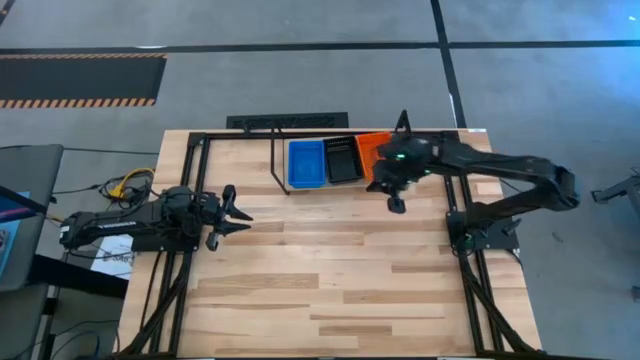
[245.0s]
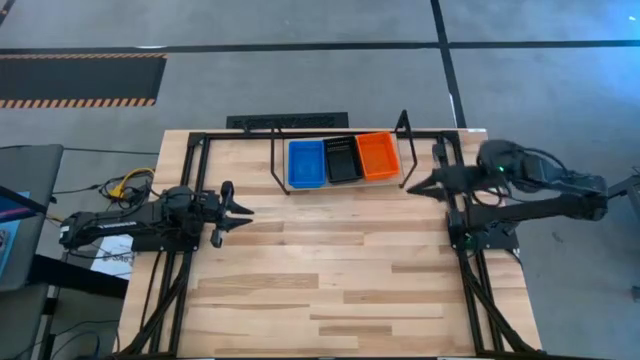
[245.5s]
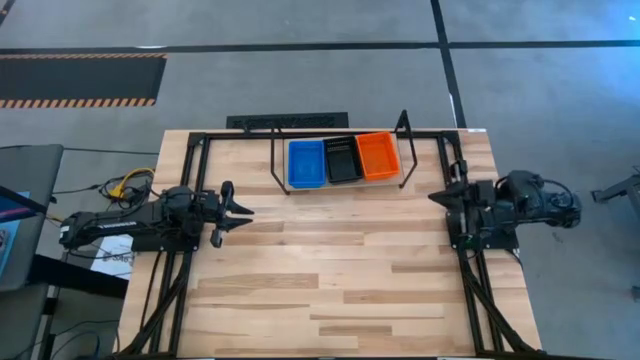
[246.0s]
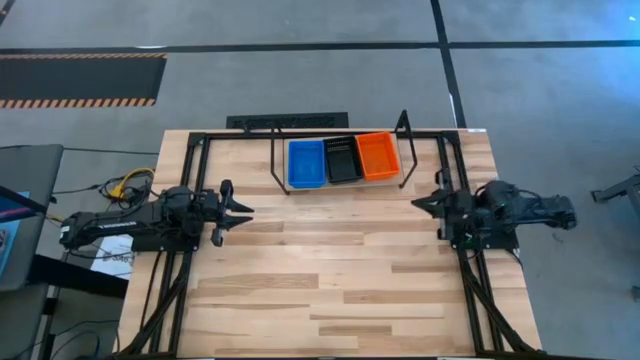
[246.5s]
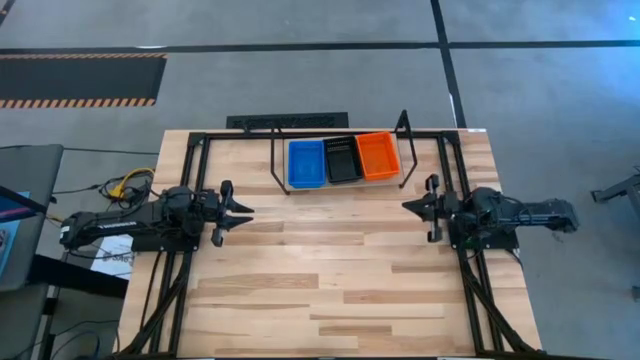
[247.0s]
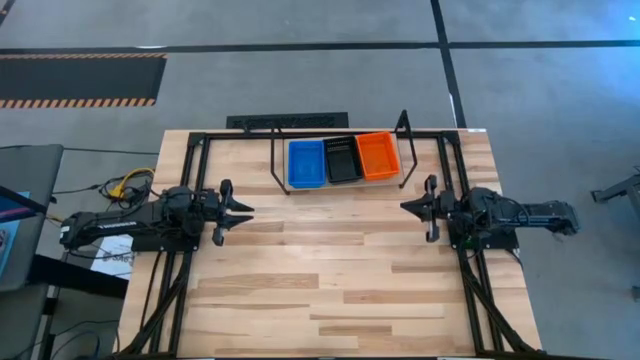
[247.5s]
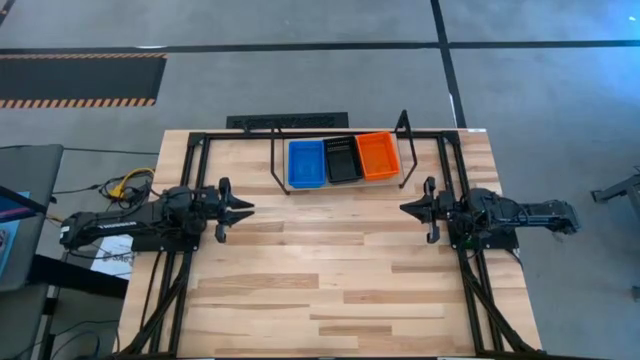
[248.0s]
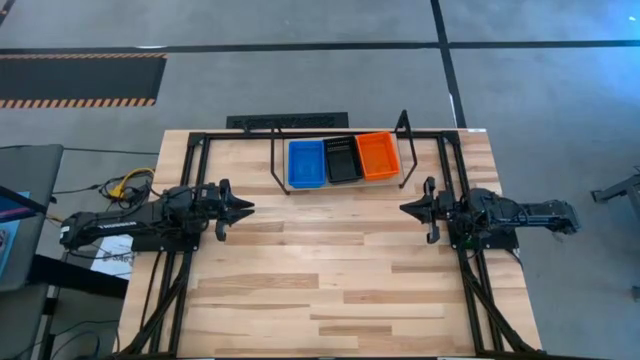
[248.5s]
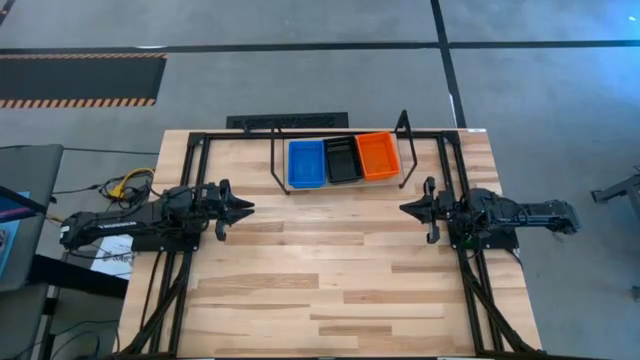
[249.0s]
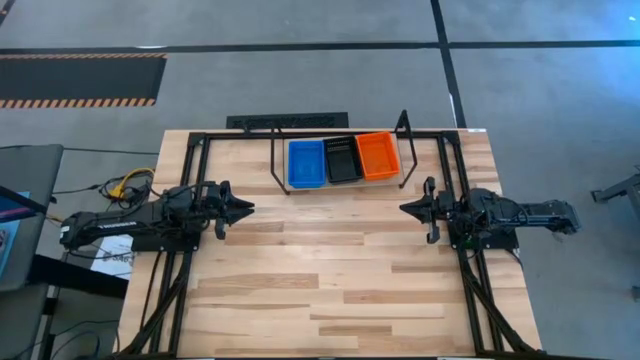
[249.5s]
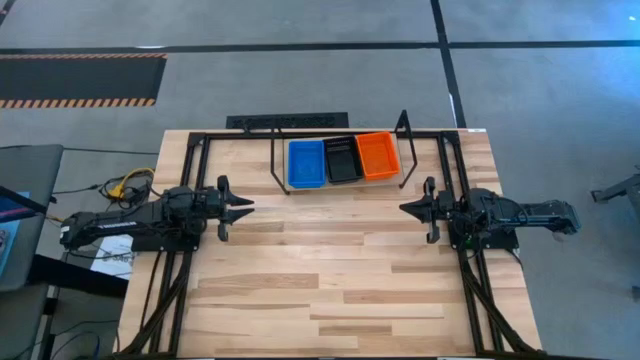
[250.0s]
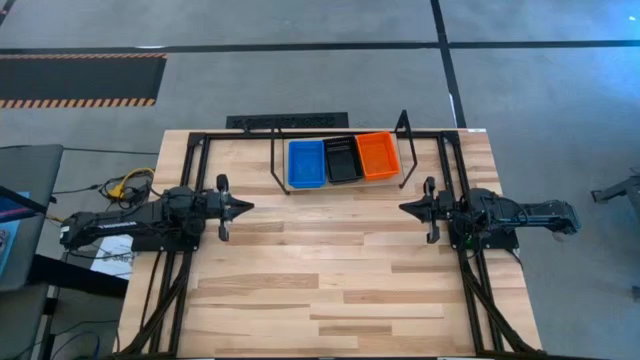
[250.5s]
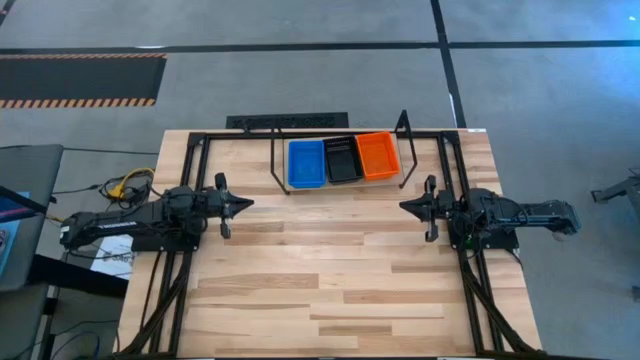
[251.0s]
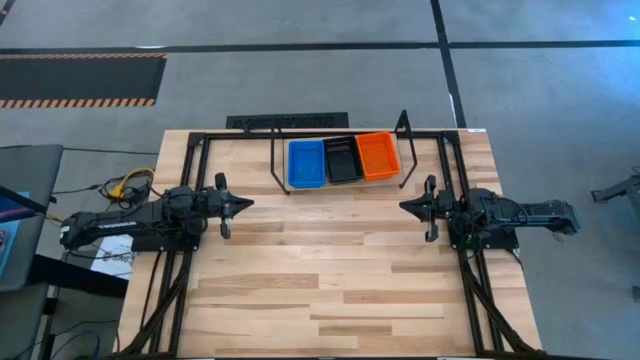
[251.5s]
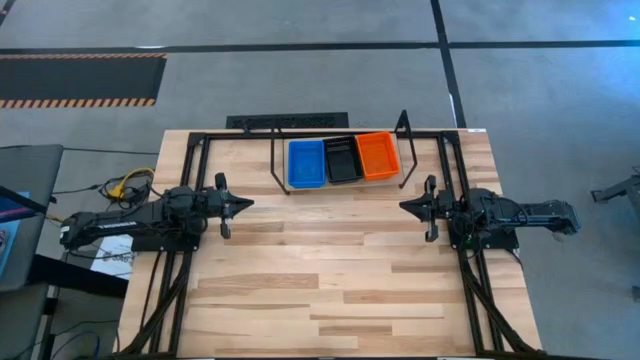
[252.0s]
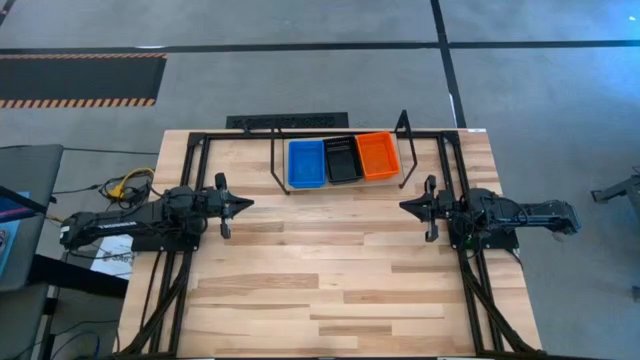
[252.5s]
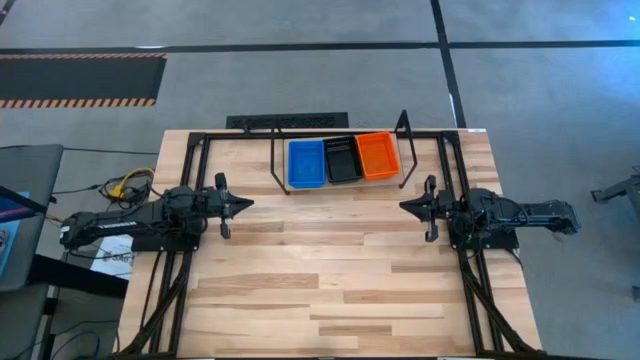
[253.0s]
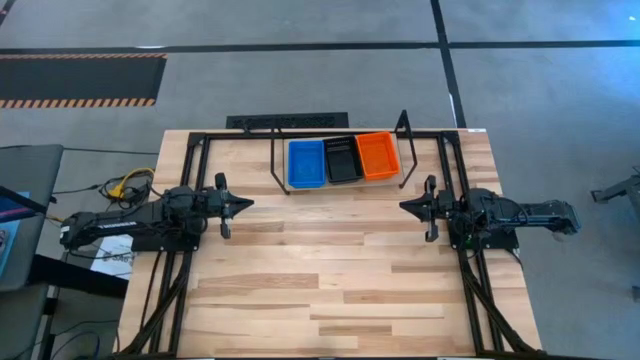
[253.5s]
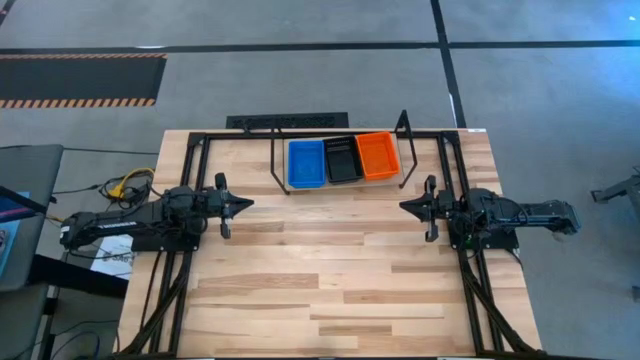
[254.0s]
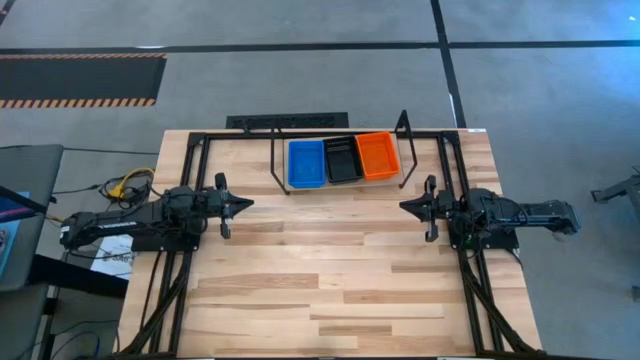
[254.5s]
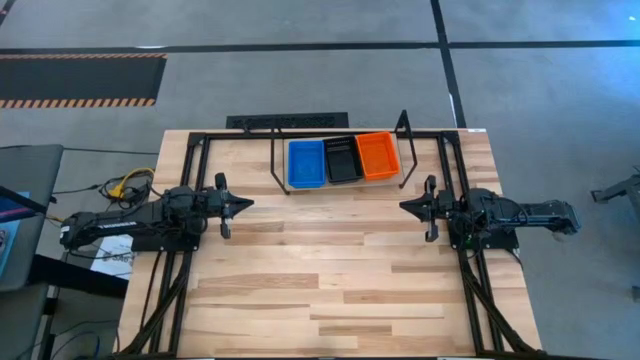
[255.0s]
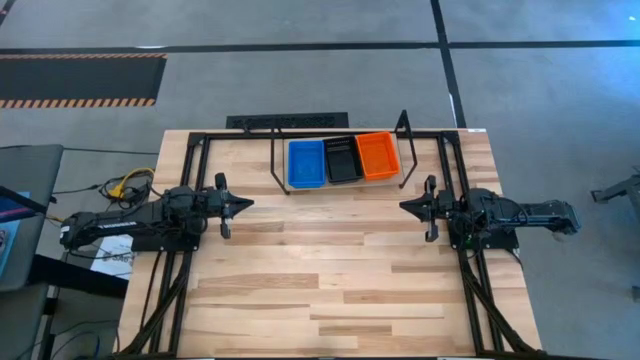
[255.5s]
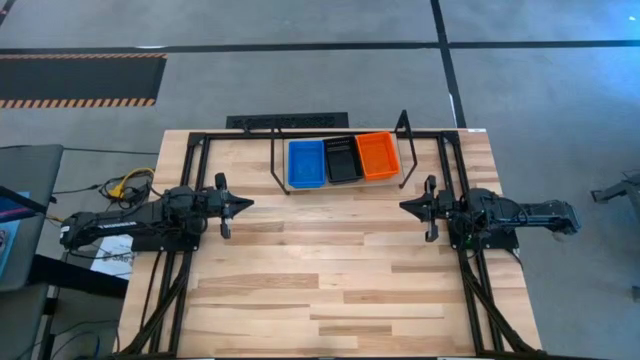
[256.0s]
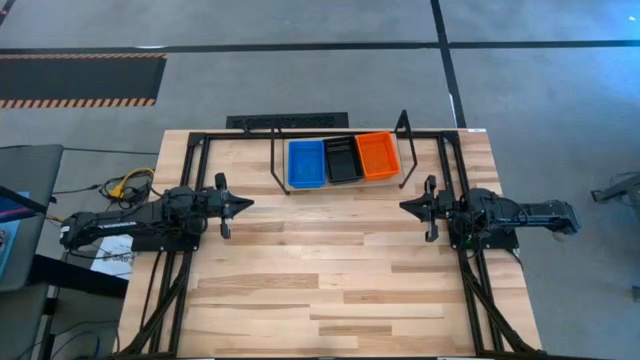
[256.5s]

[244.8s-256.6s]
Task: Stack baskets on shelf by color
Return to Home Position

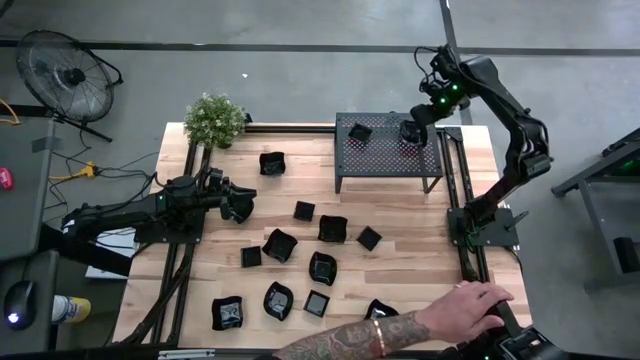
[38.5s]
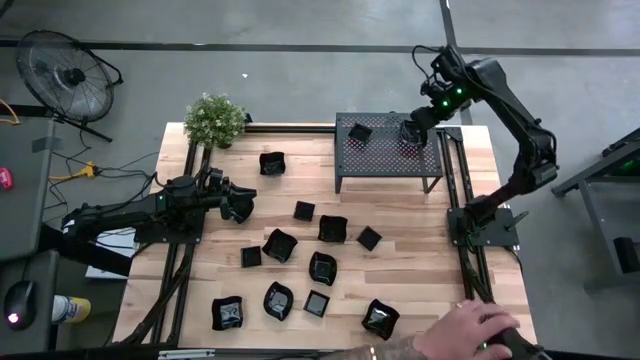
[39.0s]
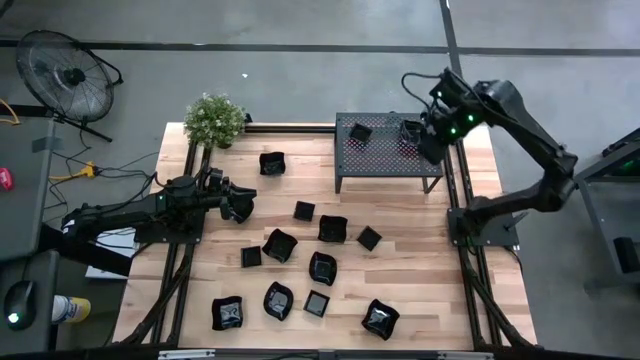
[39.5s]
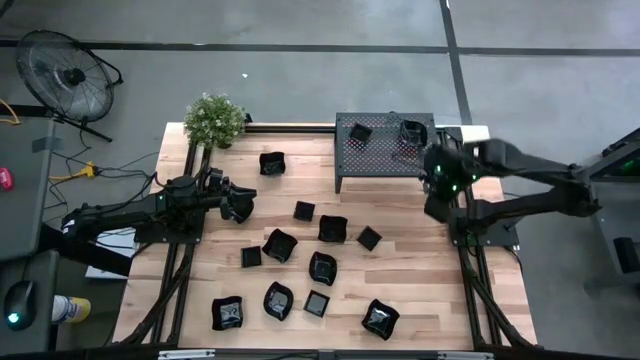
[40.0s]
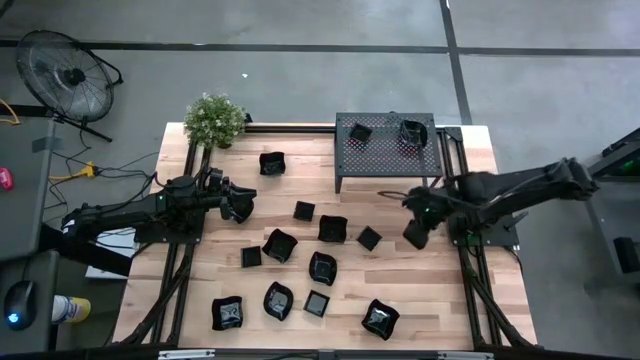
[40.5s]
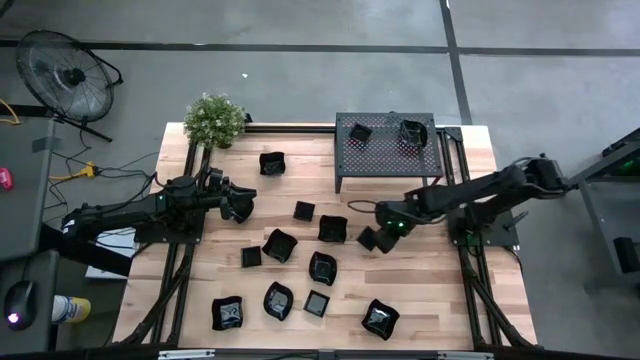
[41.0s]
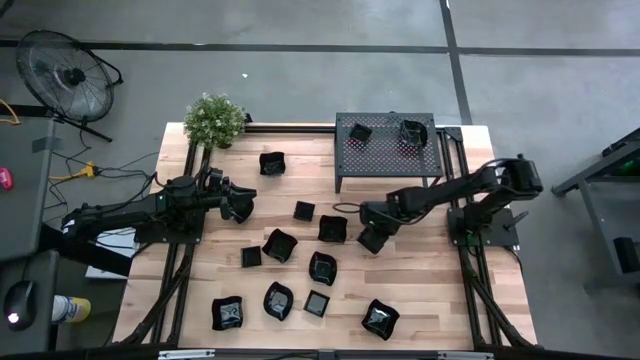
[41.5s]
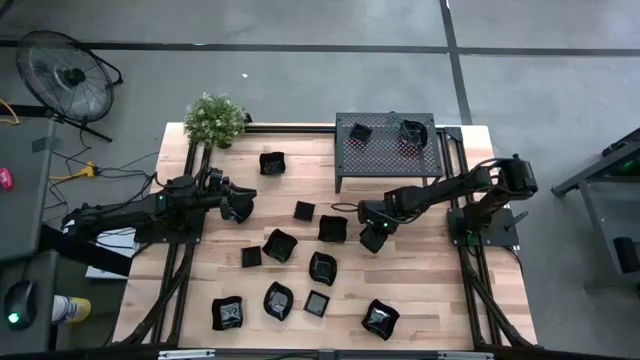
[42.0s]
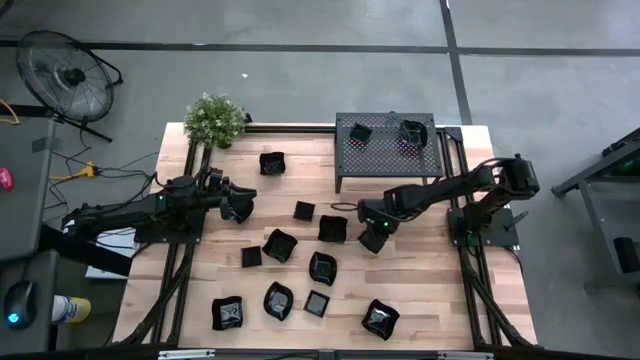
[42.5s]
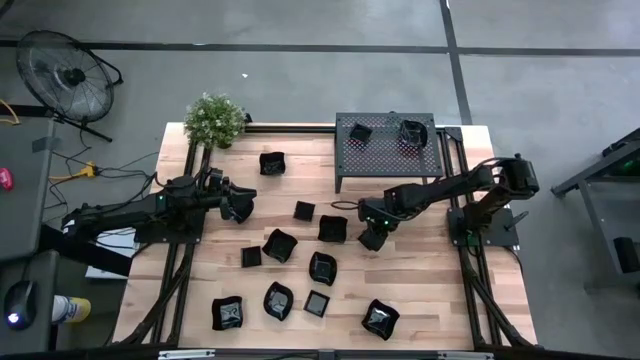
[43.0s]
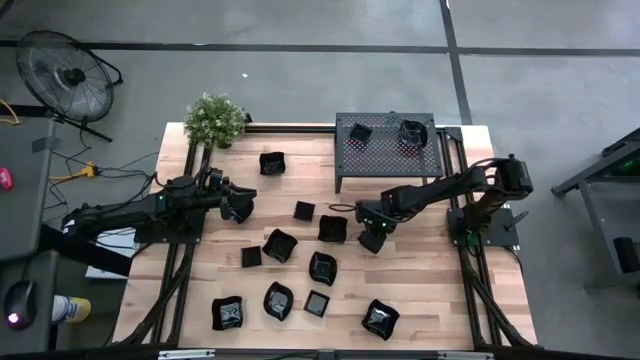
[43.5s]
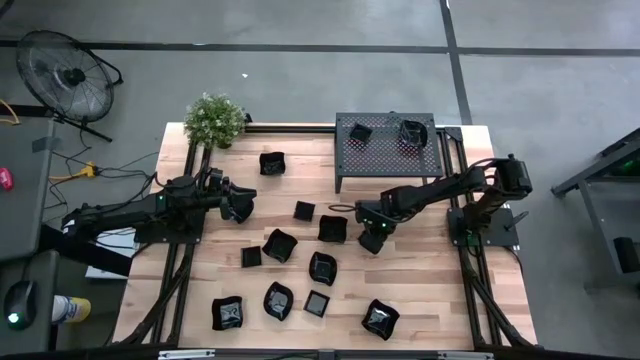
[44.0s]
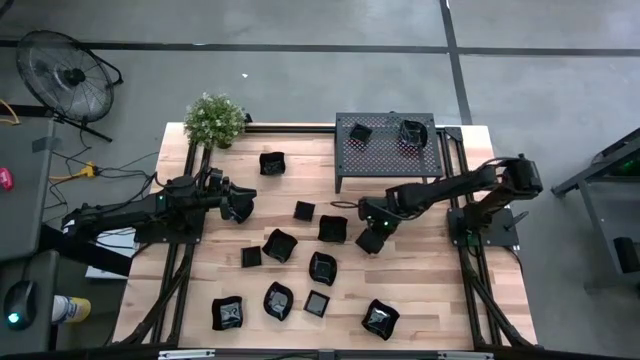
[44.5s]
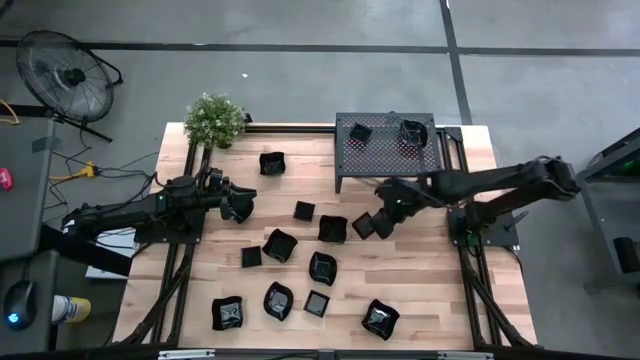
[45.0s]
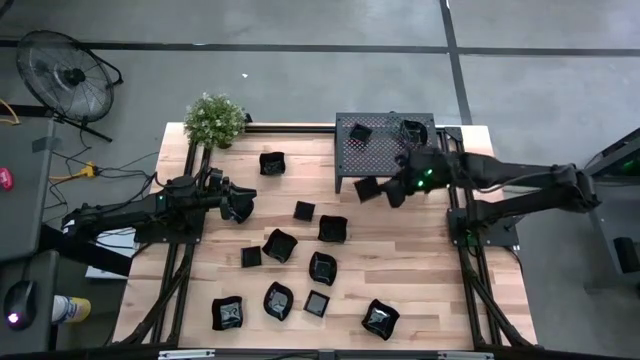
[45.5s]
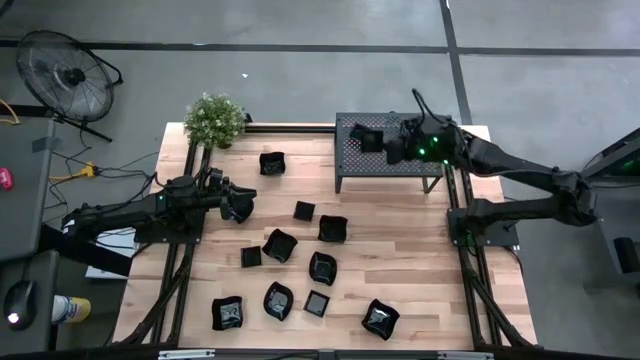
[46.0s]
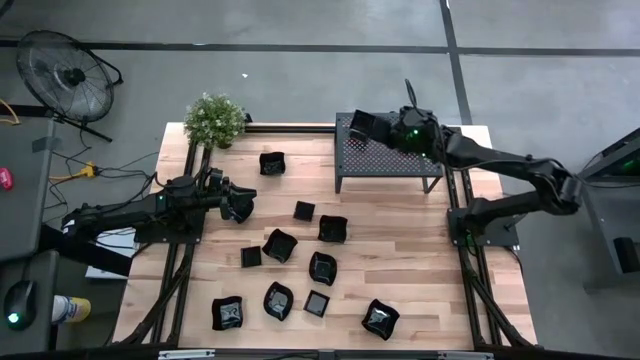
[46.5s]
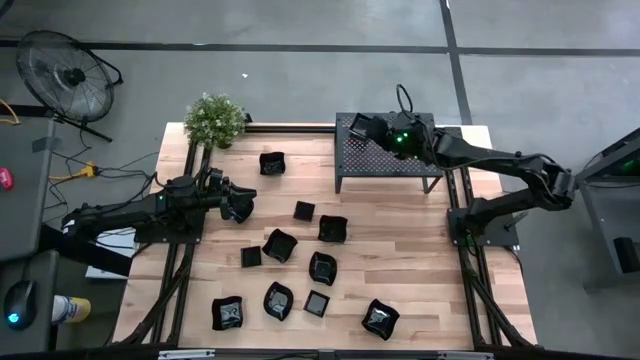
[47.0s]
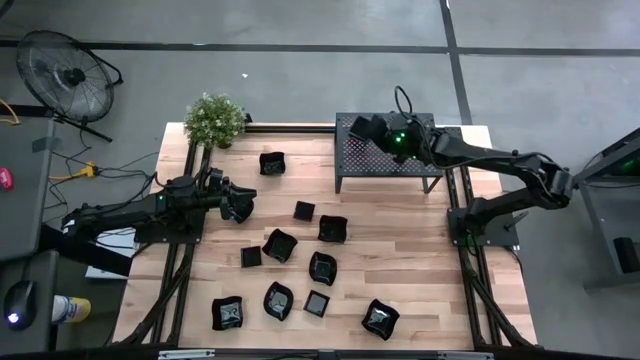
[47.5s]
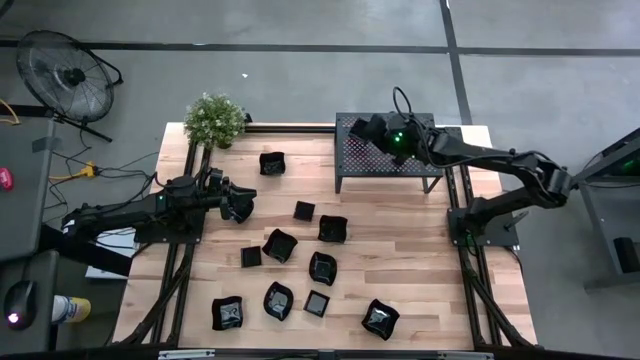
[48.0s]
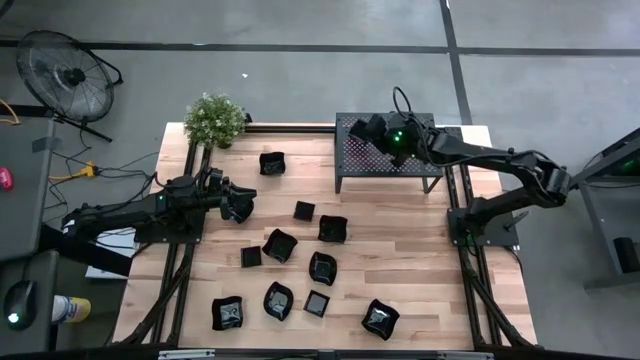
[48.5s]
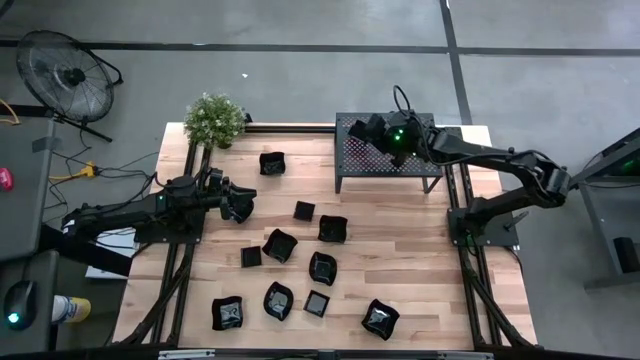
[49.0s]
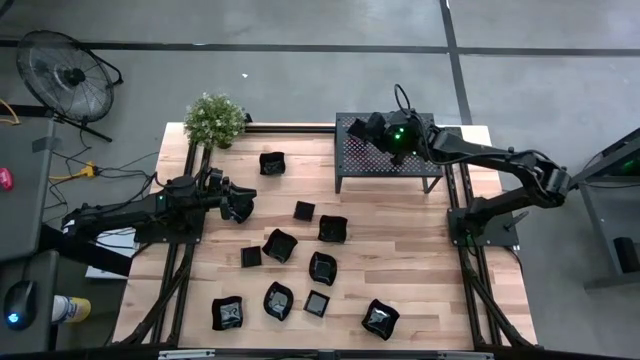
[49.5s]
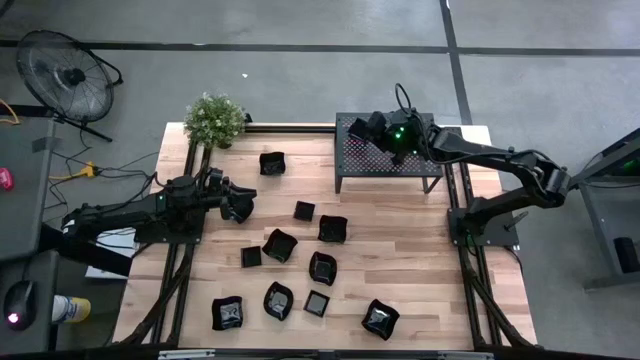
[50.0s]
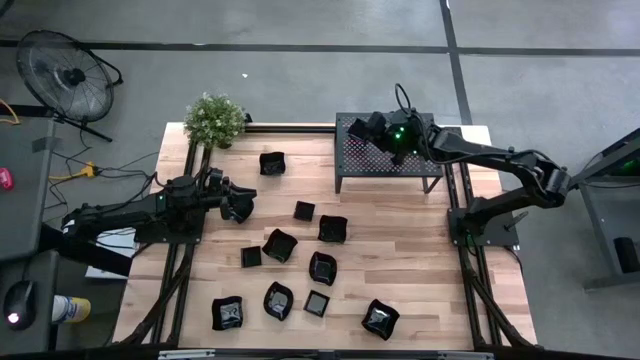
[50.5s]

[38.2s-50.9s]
Task: Pick & Place Mini shaped plates
Stack the black square plate on top of the black square plate on the shelf
